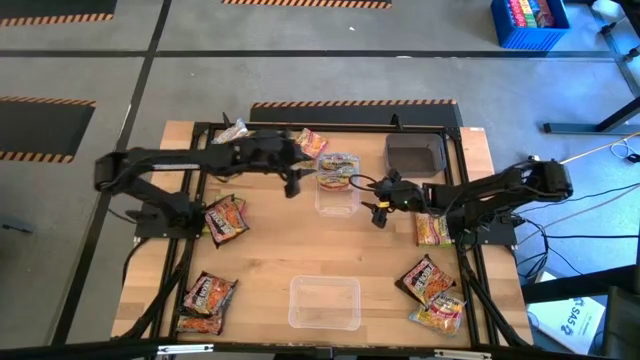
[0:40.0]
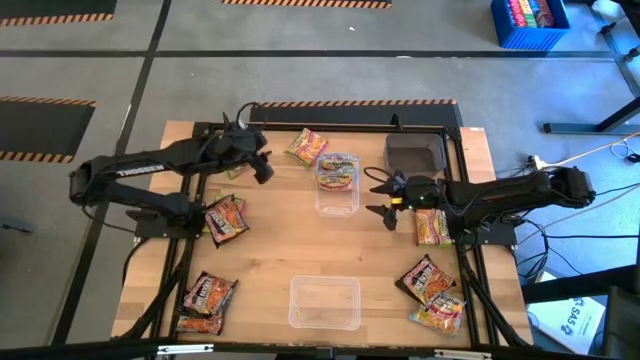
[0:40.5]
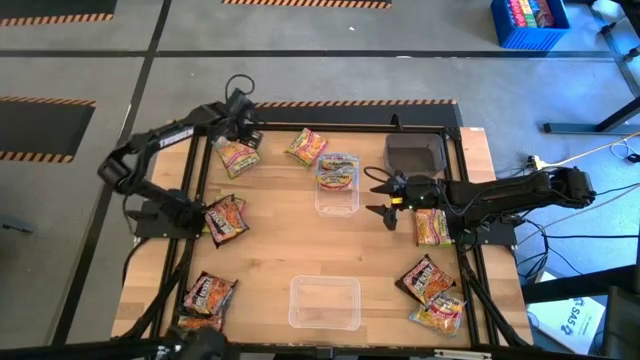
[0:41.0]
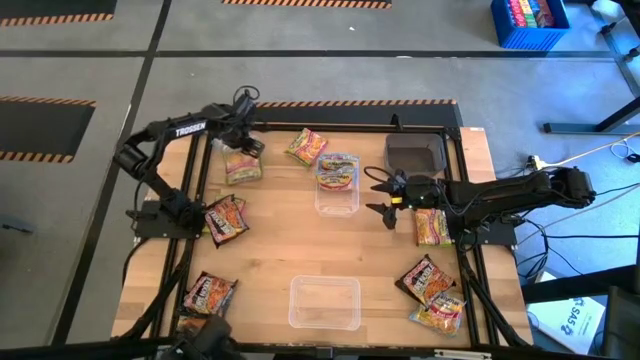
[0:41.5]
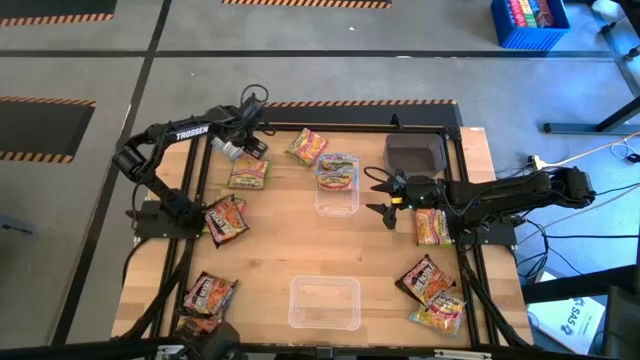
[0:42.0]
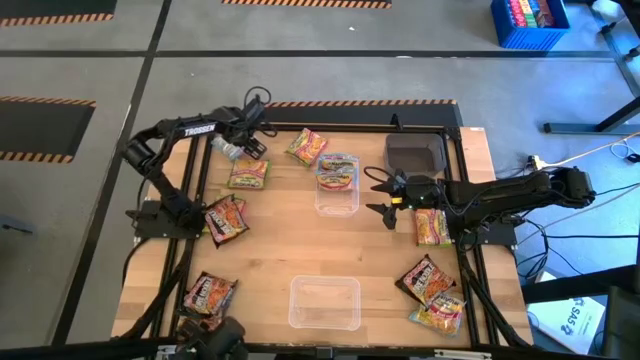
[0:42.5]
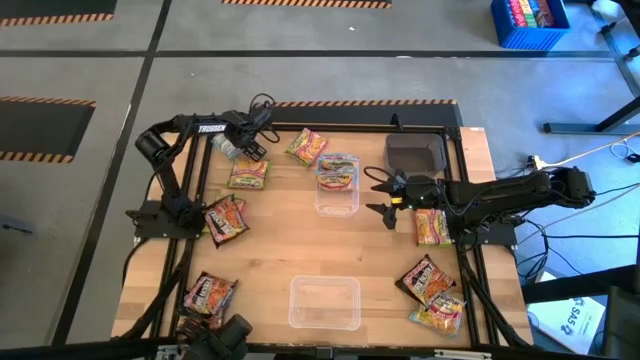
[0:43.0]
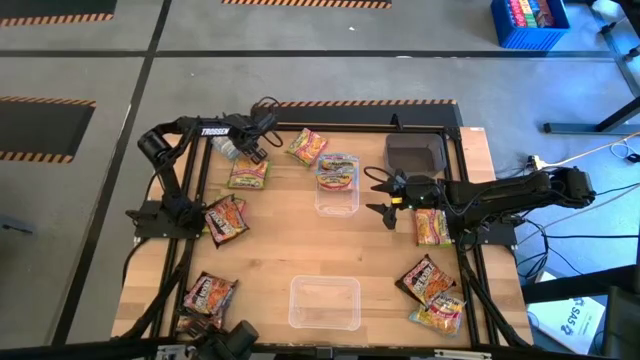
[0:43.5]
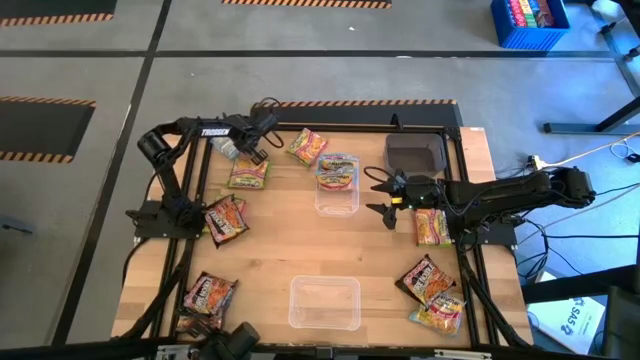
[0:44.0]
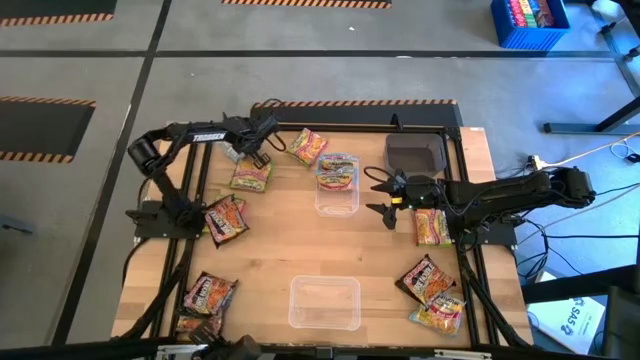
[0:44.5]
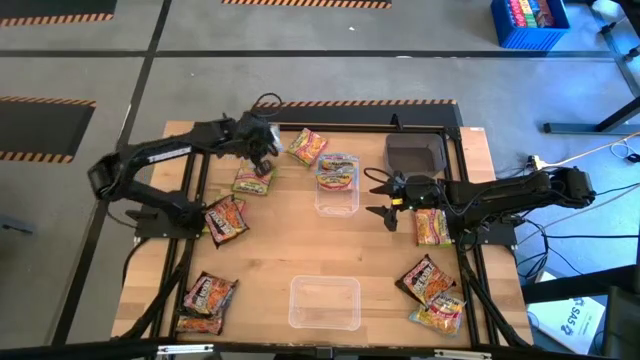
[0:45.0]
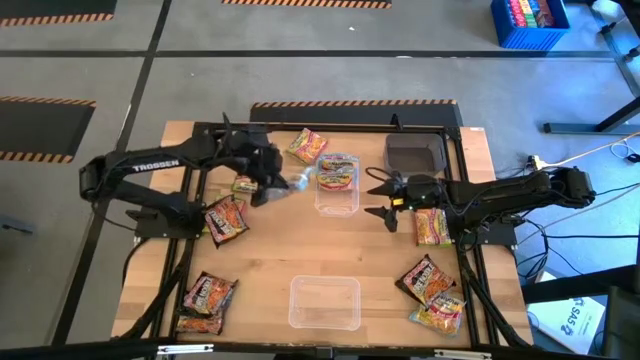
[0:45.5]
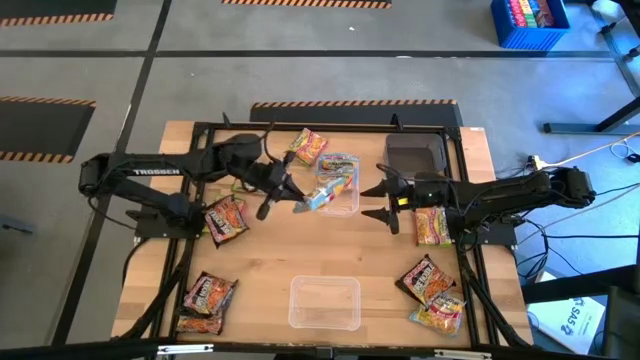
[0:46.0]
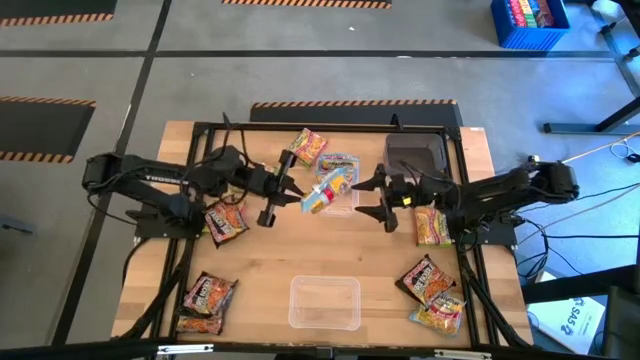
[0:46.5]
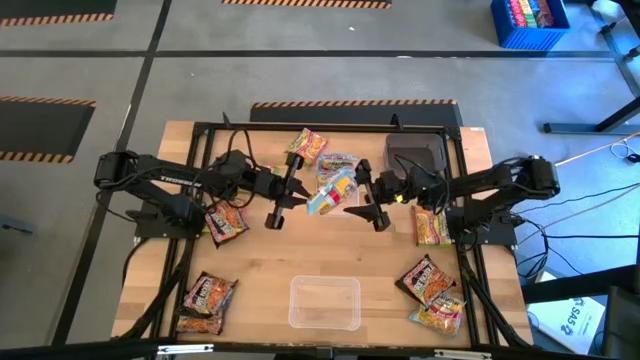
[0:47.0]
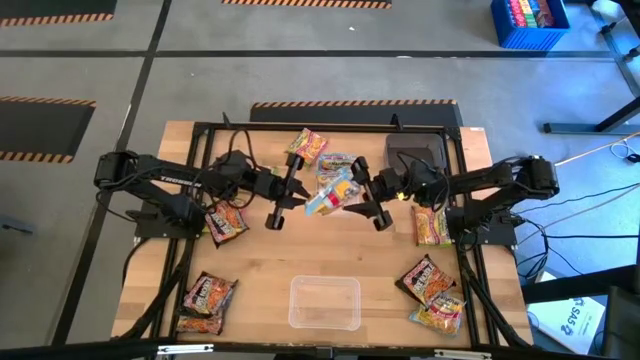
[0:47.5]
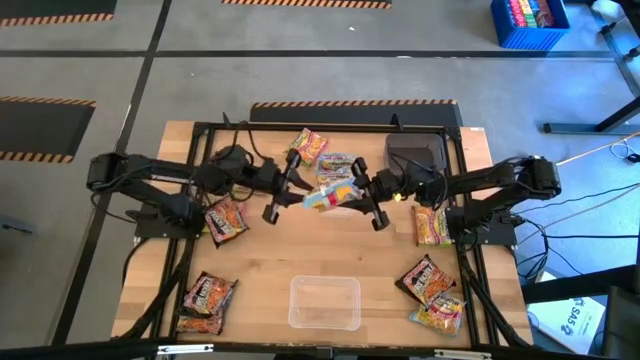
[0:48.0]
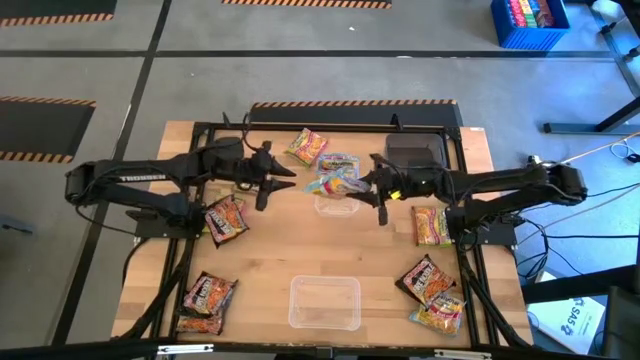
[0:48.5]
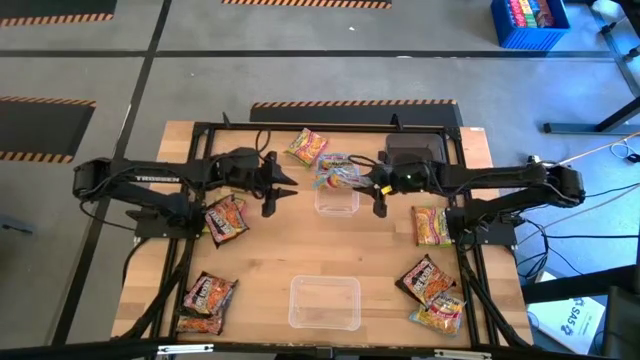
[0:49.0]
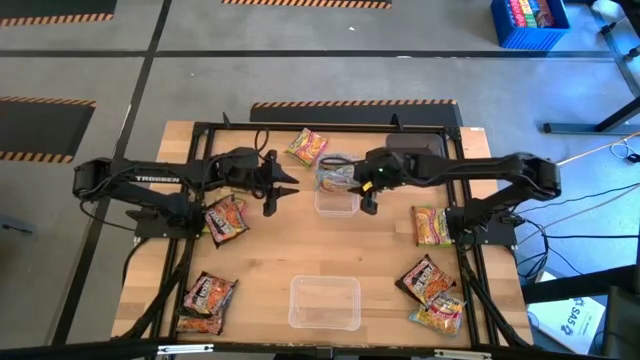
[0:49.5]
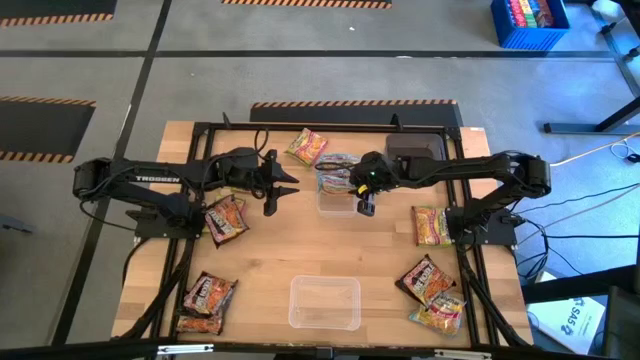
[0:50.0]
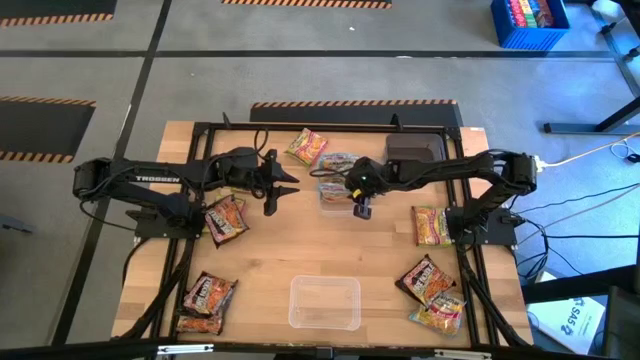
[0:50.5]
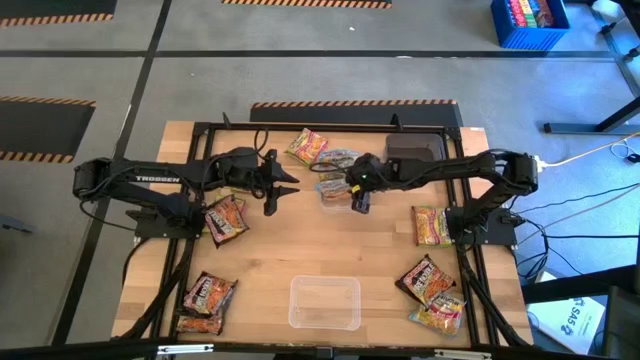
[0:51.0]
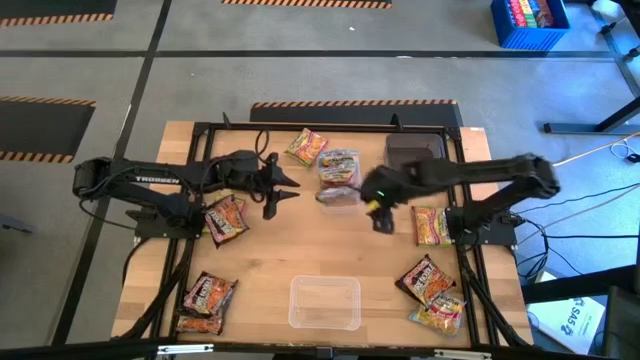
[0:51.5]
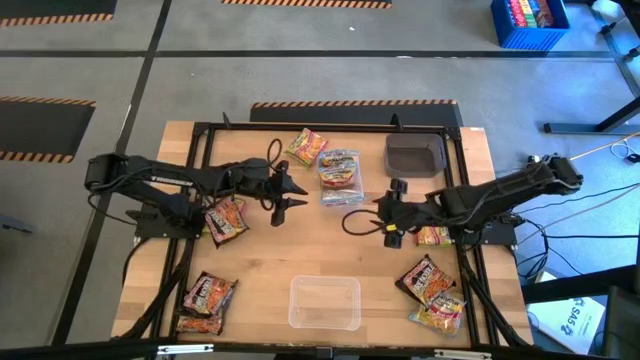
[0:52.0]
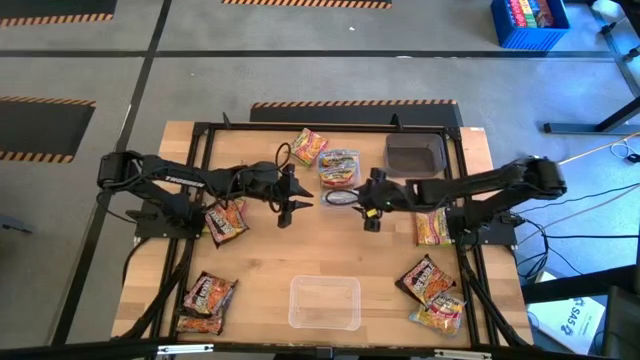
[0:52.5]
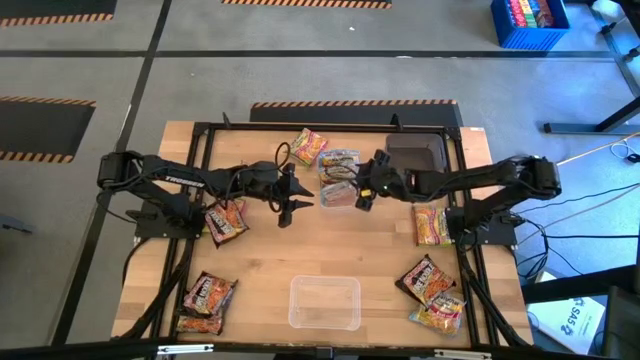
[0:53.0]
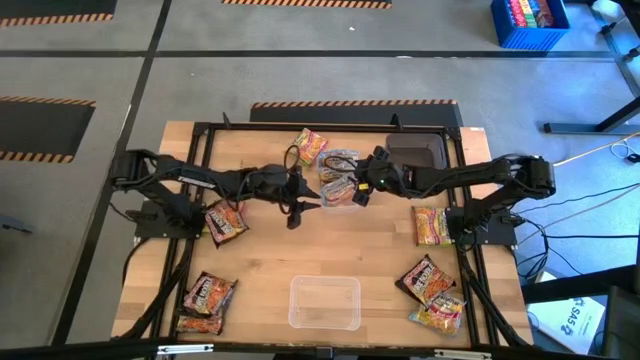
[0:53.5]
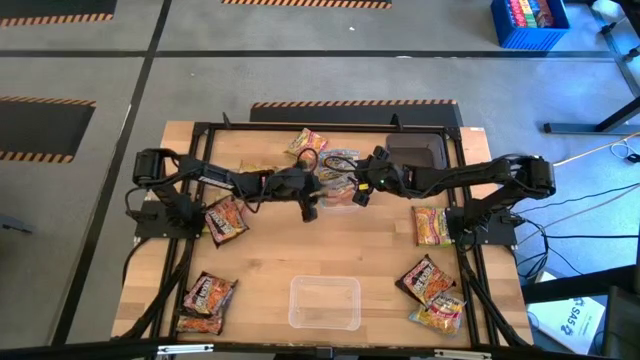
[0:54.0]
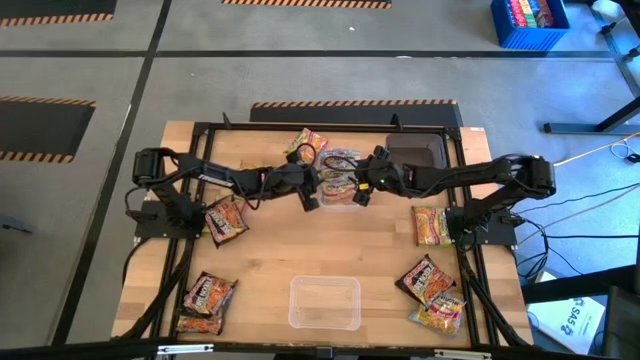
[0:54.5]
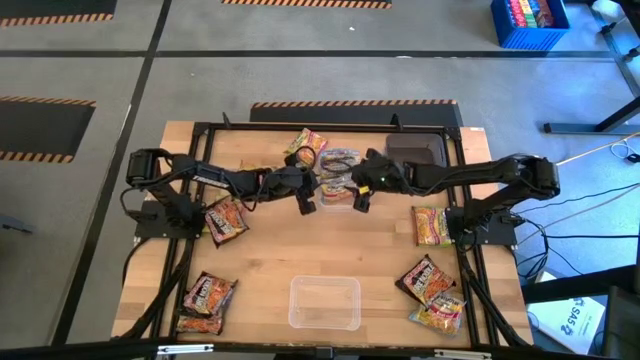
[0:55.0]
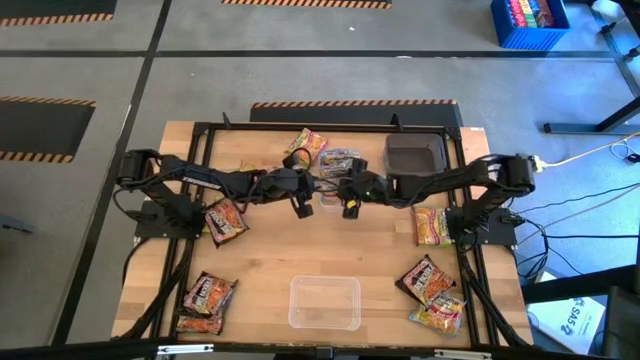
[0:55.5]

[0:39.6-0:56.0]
Task: Sort Maruchan noodles
Put the top blue noodles into the top transparent bin

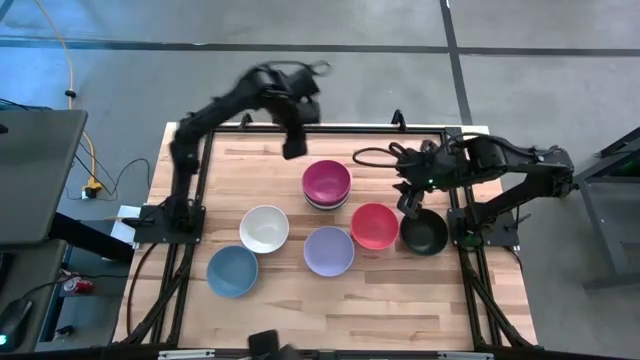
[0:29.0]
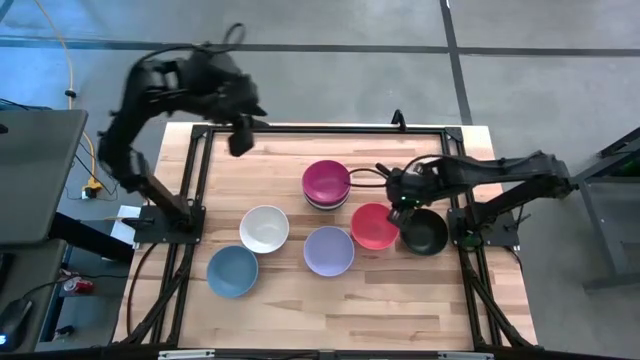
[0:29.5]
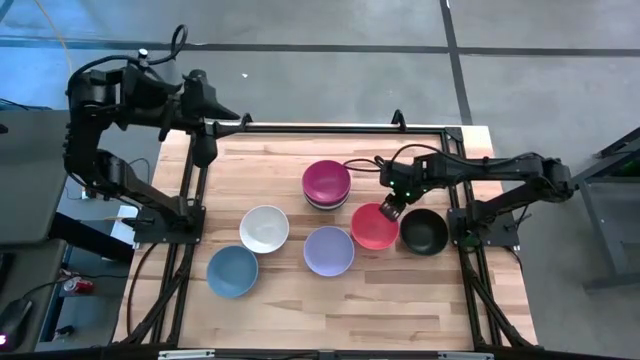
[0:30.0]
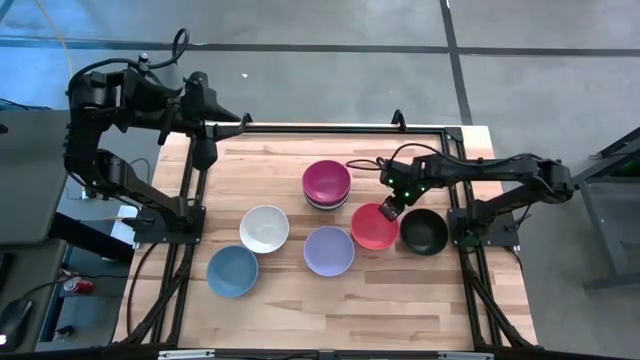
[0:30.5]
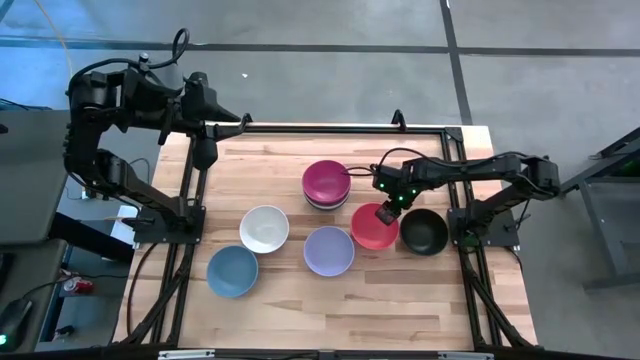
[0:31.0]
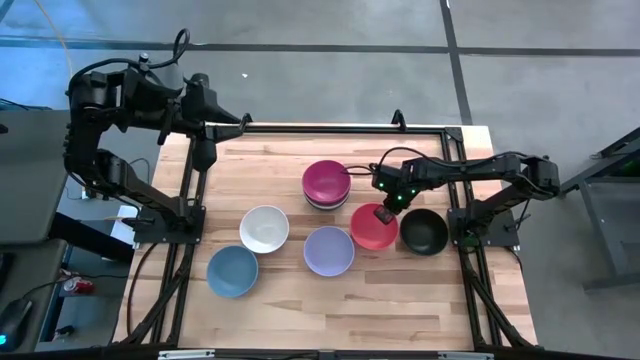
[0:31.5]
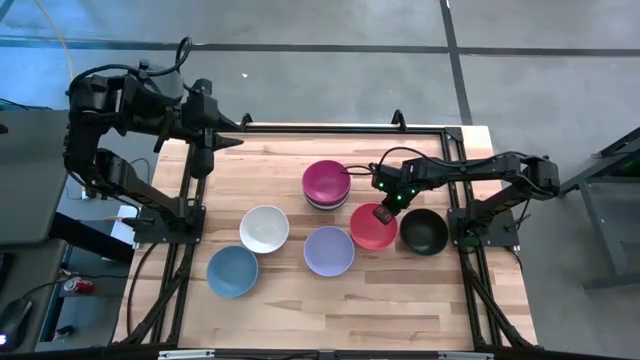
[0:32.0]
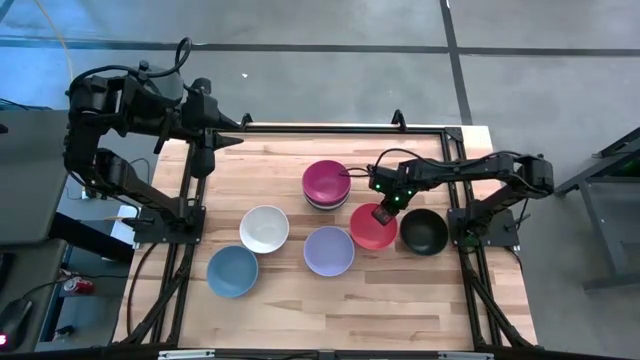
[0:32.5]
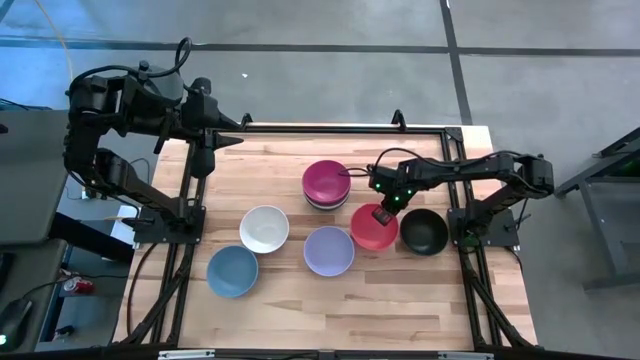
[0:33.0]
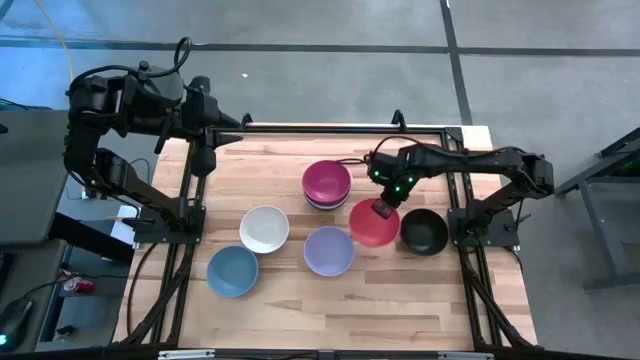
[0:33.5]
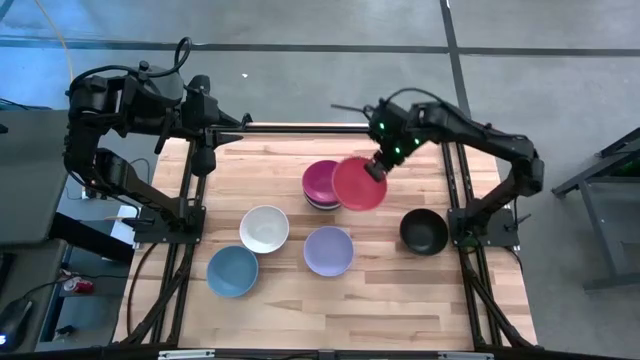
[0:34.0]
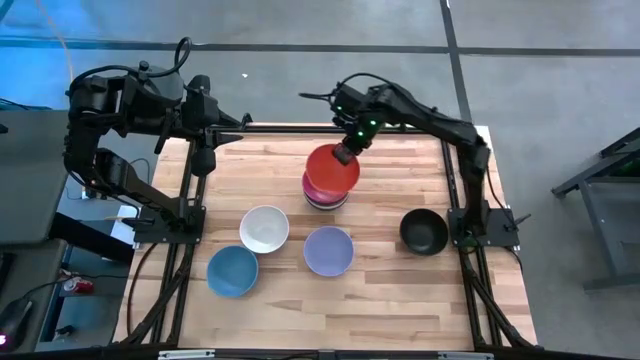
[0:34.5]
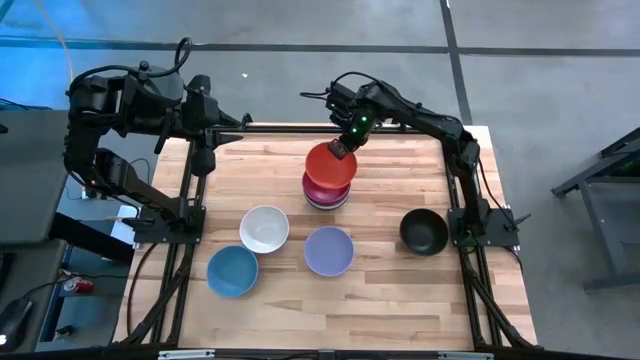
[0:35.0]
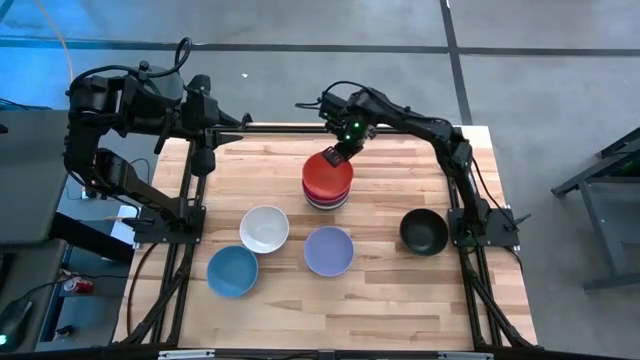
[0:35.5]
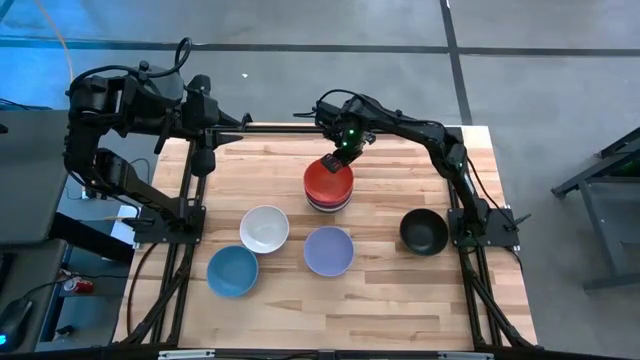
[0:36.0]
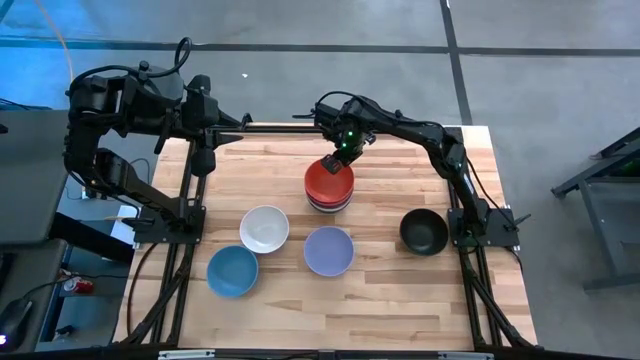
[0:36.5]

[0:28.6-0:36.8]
Task: Nest bowls inside each other
Stack the orange bowl on top of the pink bowl
